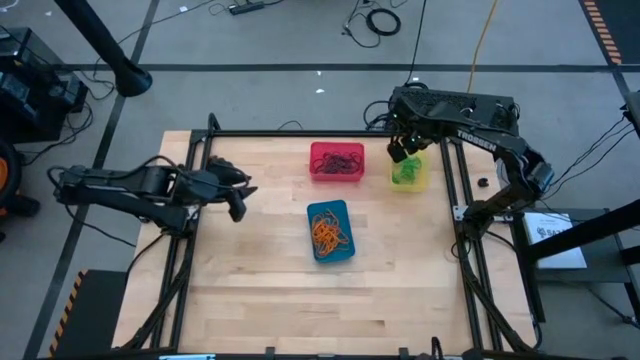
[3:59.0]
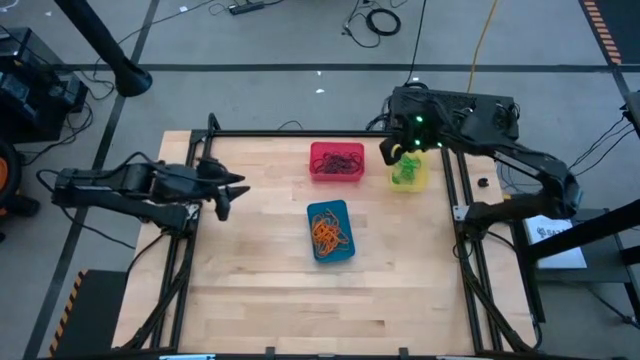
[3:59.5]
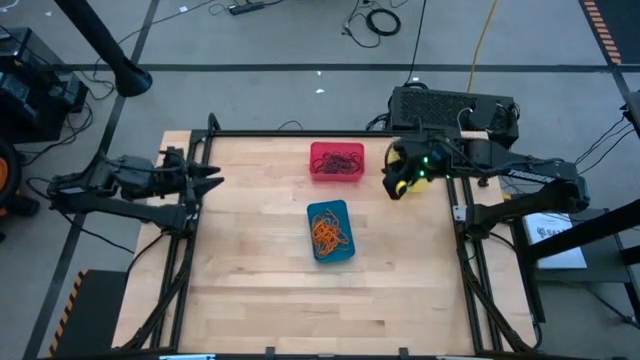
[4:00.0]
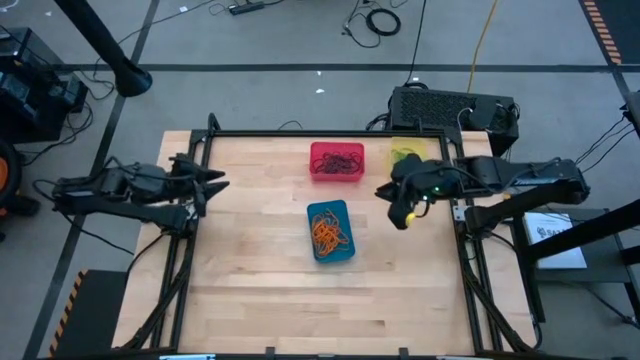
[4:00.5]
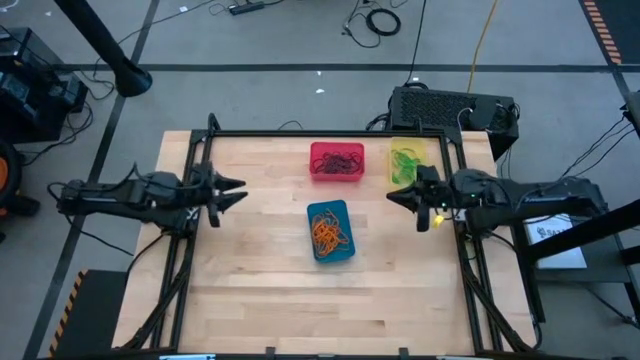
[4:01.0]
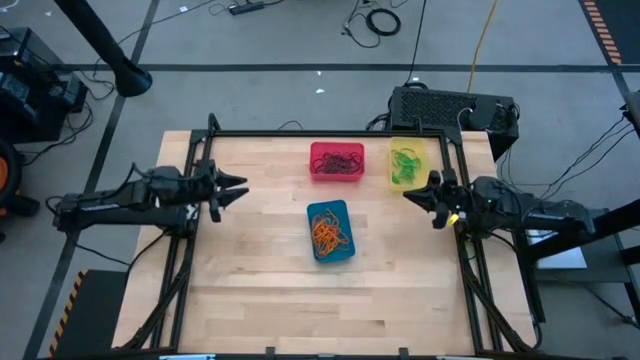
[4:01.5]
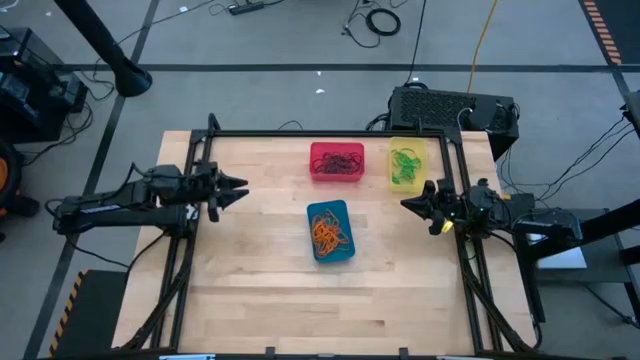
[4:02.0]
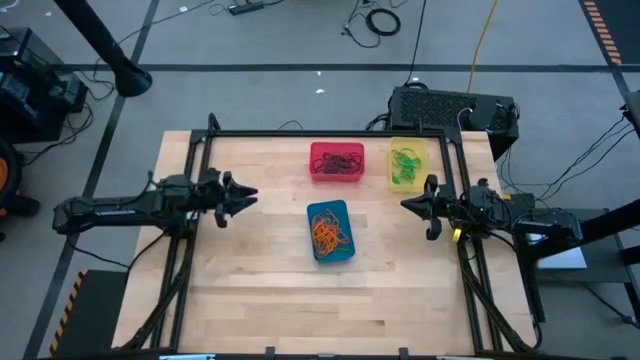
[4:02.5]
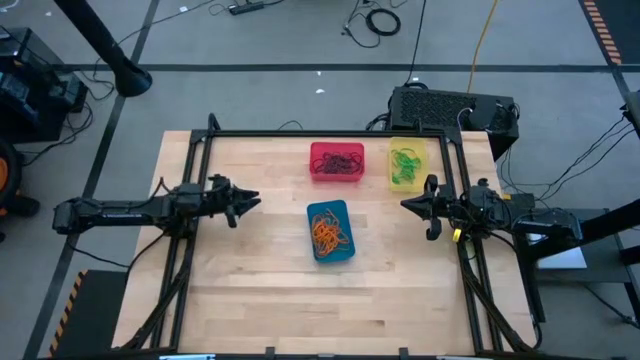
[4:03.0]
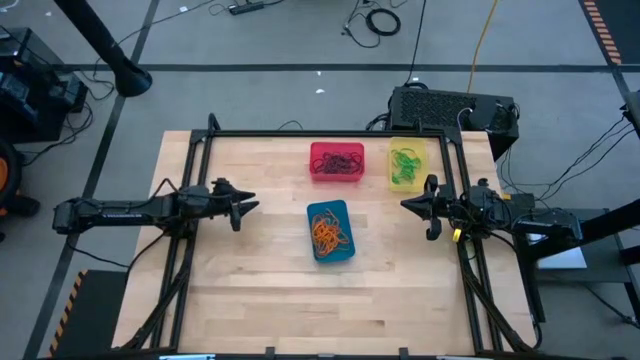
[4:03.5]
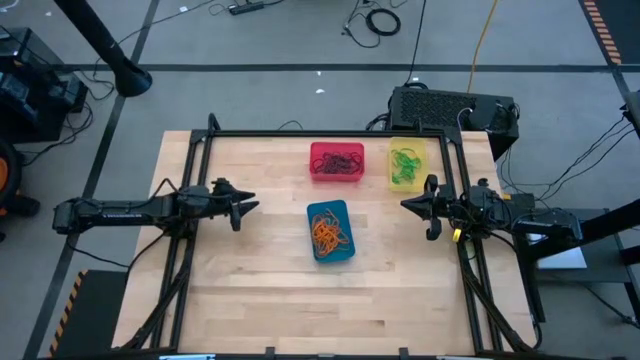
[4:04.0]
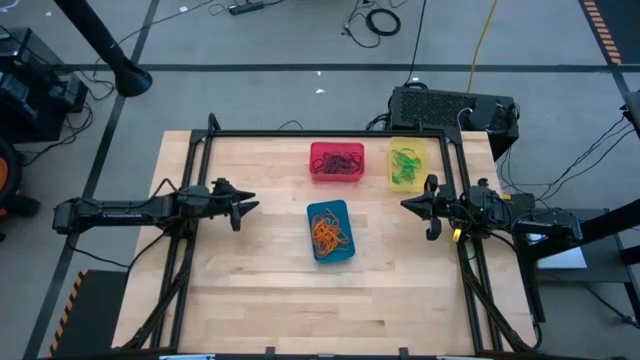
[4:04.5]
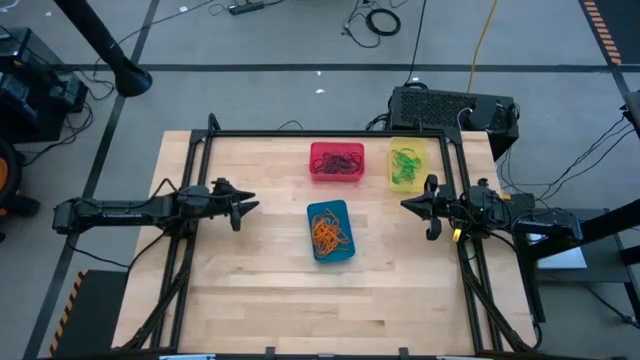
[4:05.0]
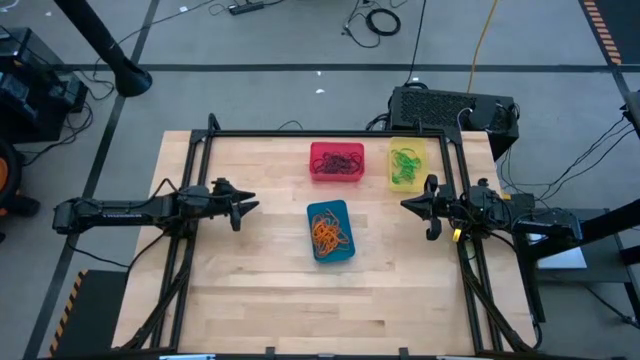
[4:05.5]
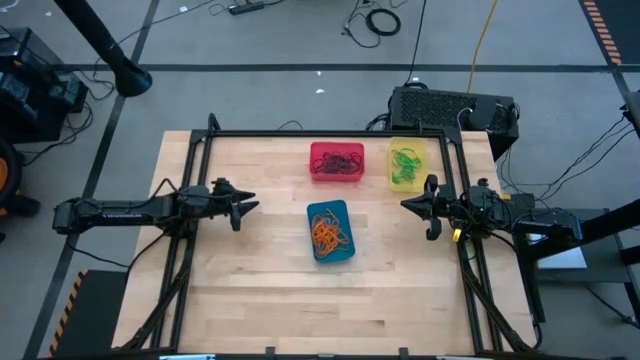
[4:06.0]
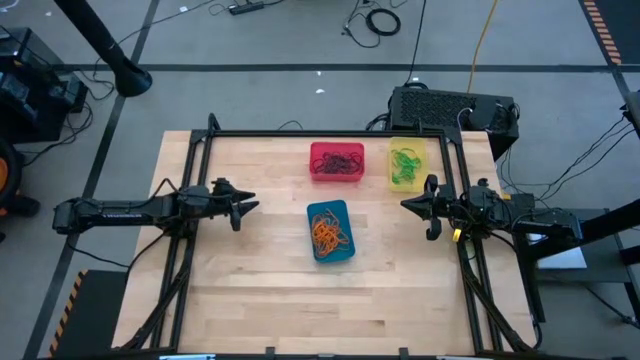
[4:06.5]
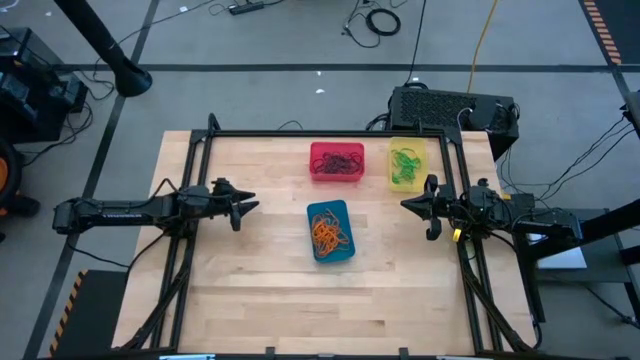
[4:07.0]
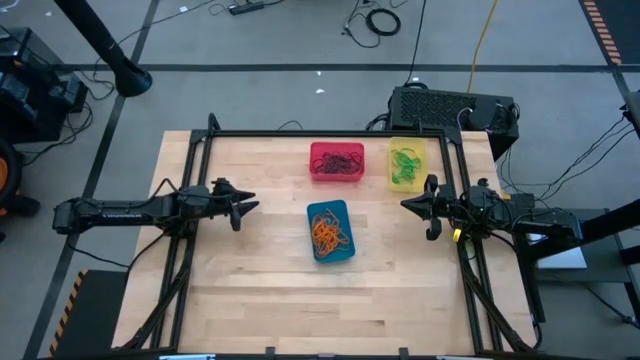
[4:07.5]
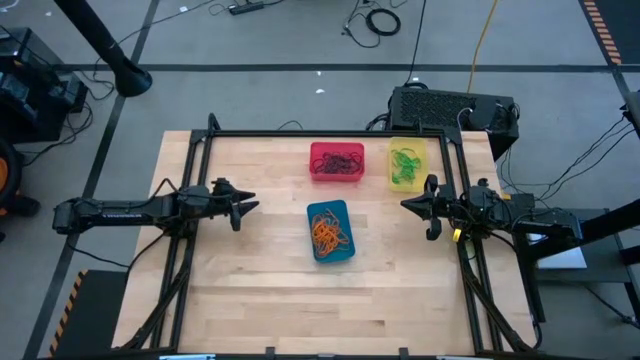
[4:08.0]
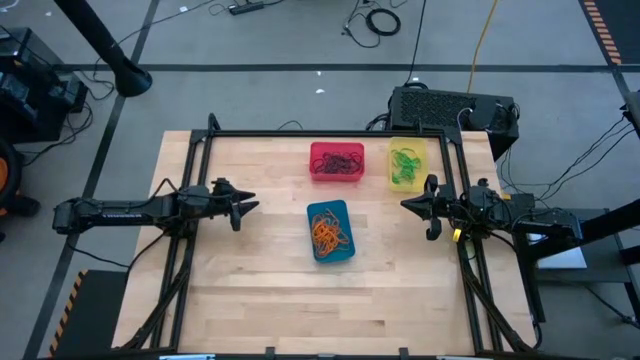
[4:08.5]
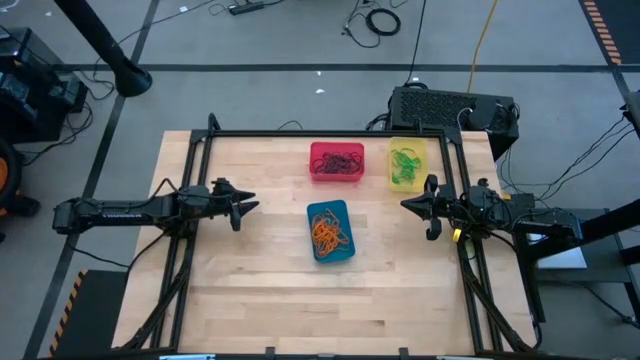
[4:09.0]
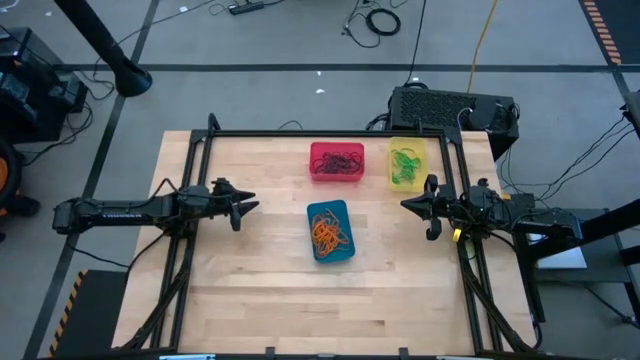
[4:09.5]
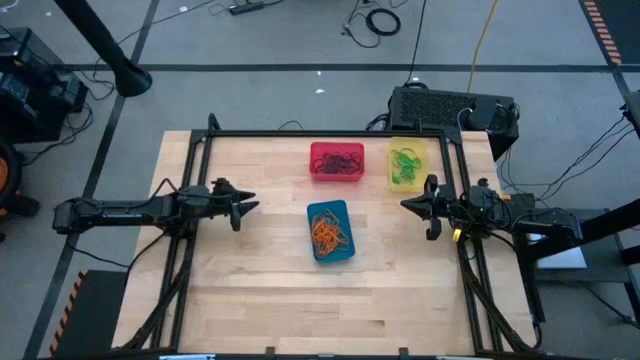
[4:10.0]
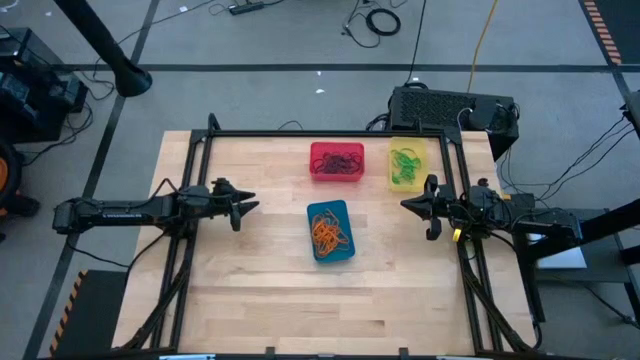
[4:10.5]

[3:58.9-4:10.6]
Task: Sort rubber bands into baskets
Return to Home Position

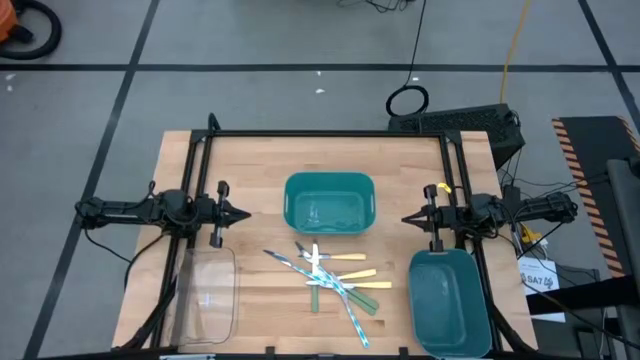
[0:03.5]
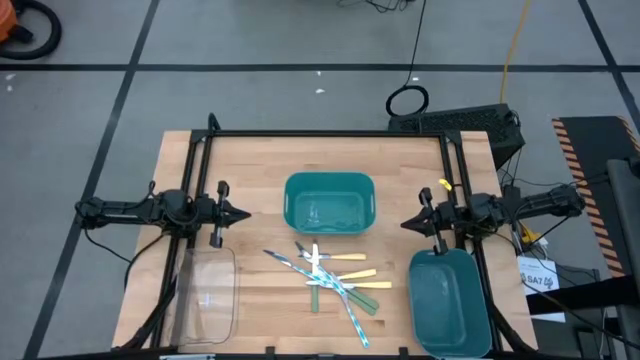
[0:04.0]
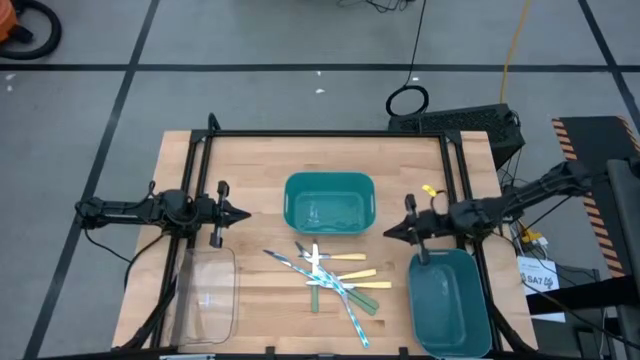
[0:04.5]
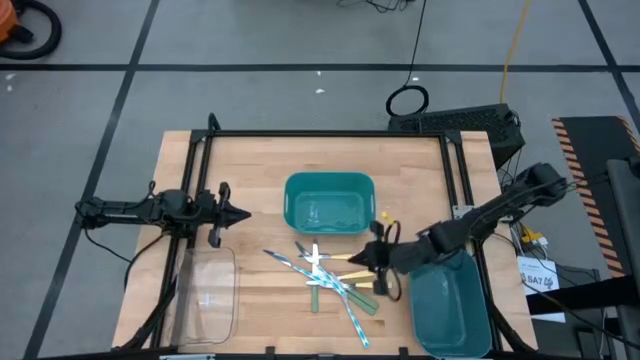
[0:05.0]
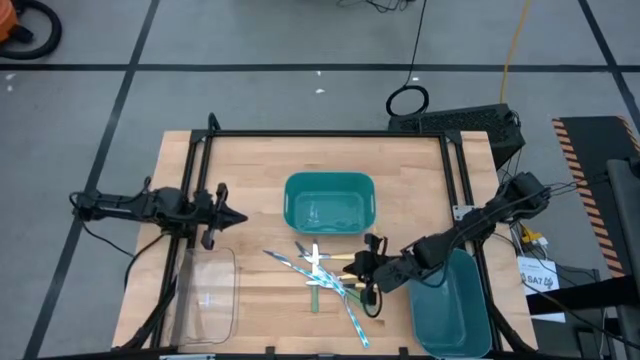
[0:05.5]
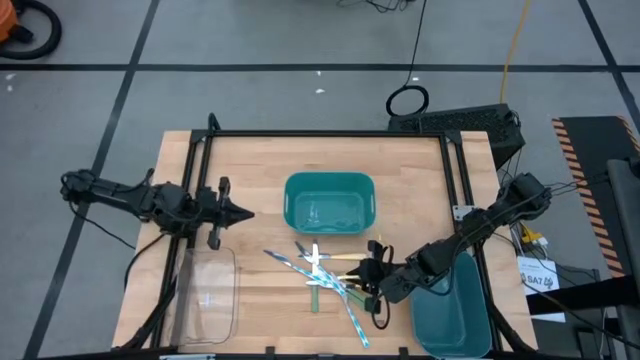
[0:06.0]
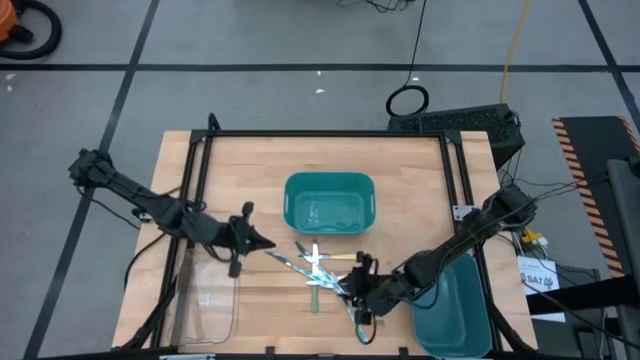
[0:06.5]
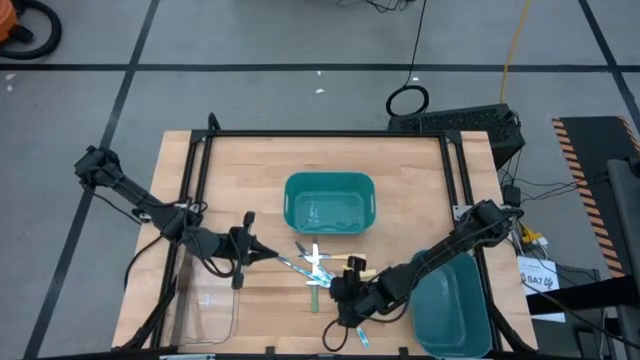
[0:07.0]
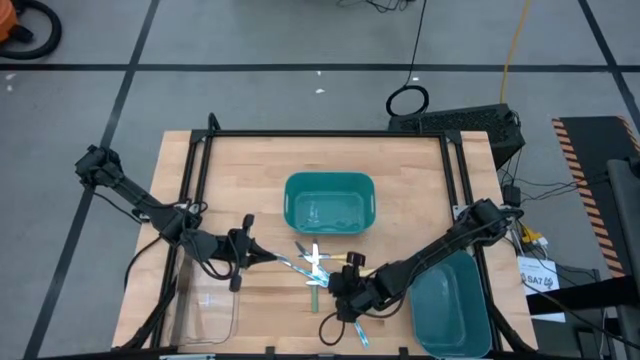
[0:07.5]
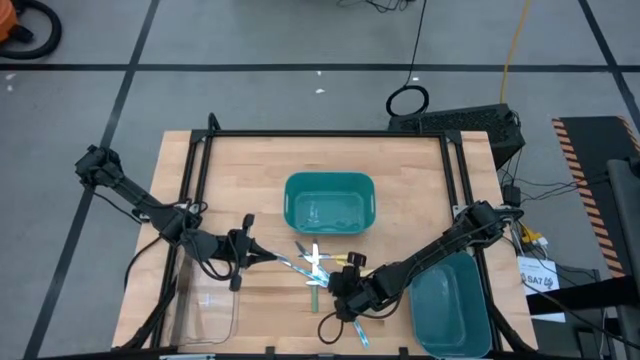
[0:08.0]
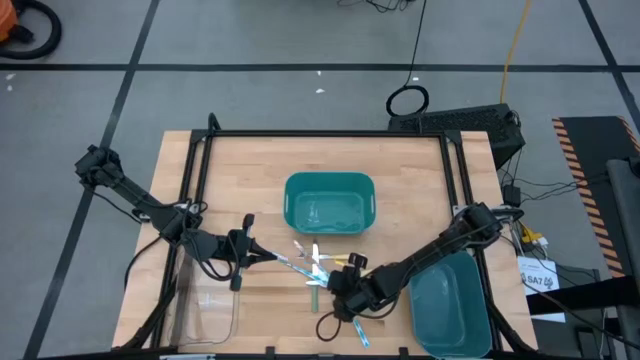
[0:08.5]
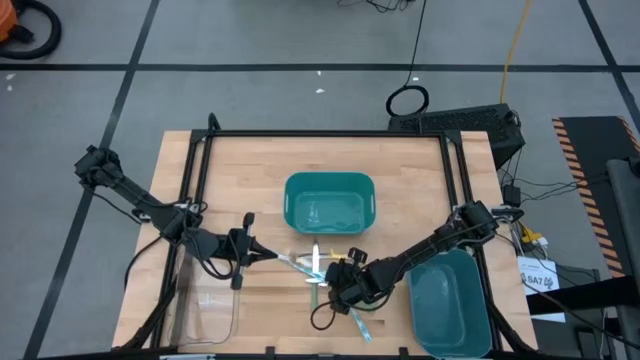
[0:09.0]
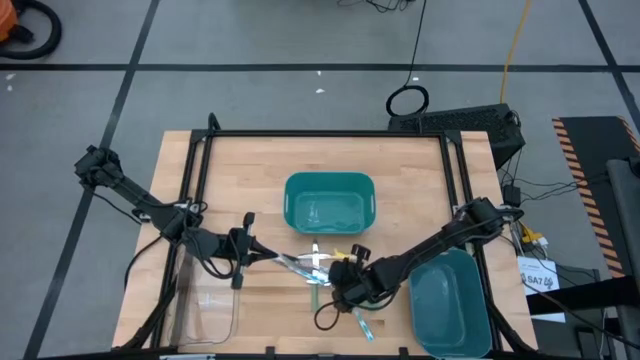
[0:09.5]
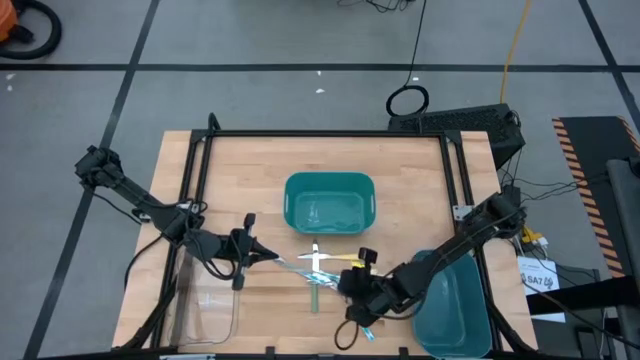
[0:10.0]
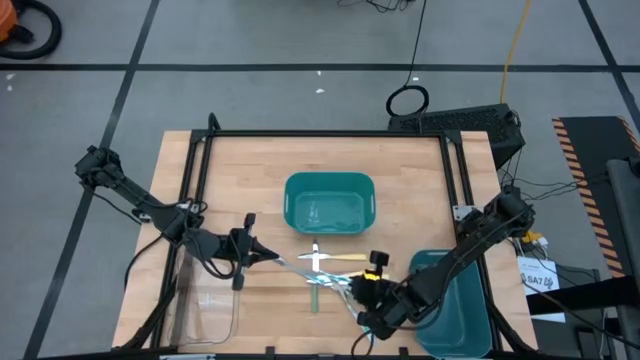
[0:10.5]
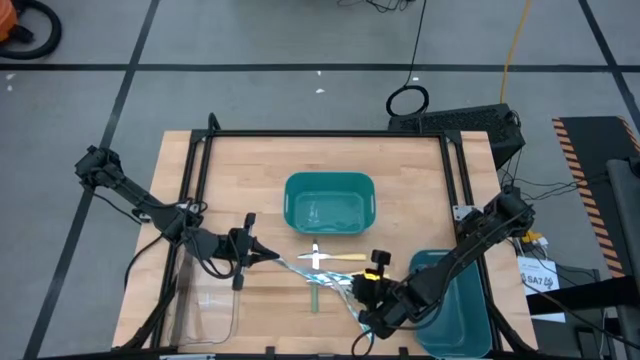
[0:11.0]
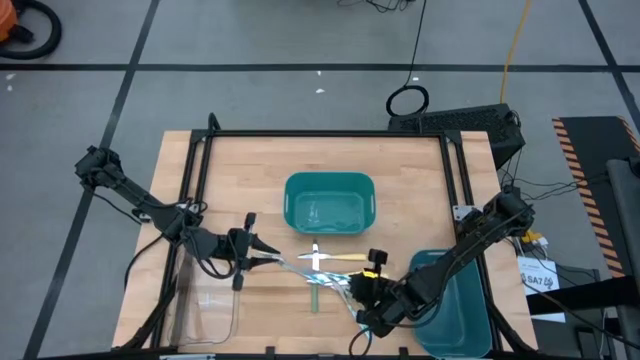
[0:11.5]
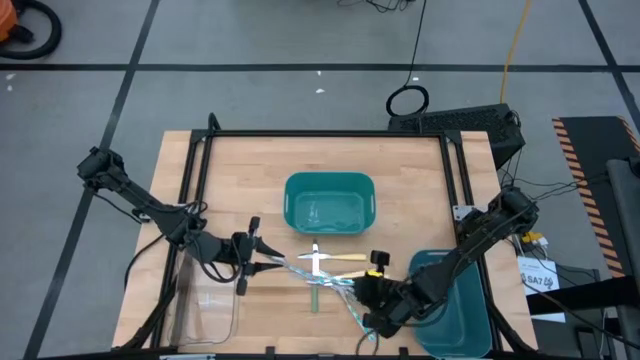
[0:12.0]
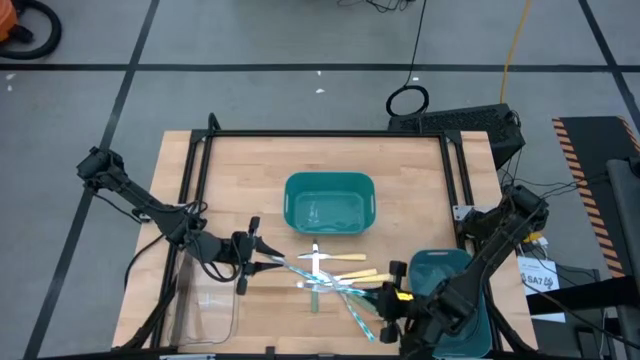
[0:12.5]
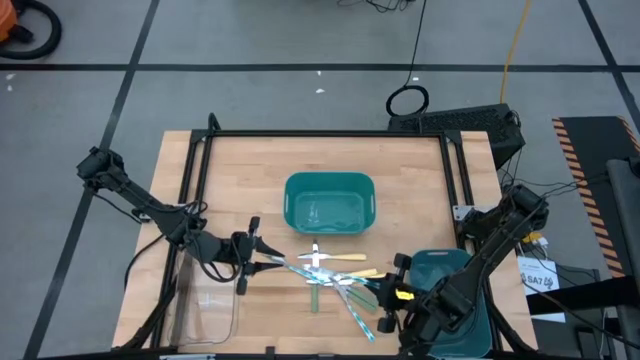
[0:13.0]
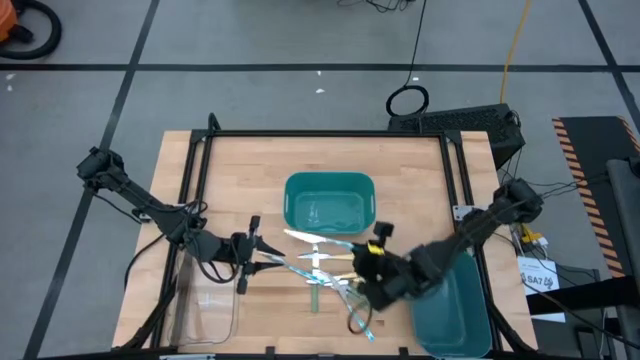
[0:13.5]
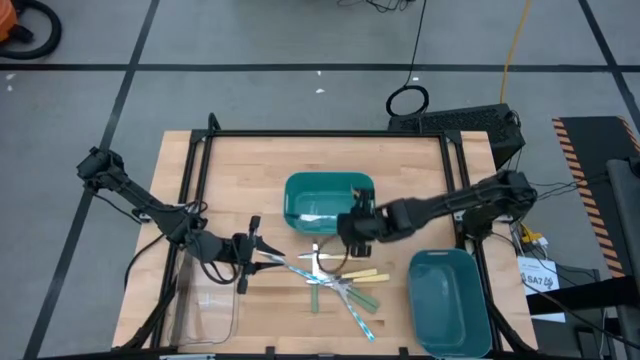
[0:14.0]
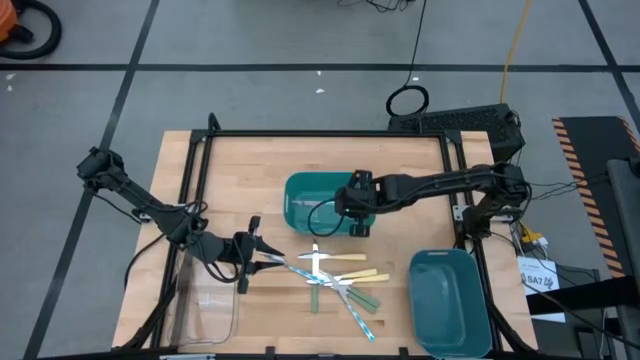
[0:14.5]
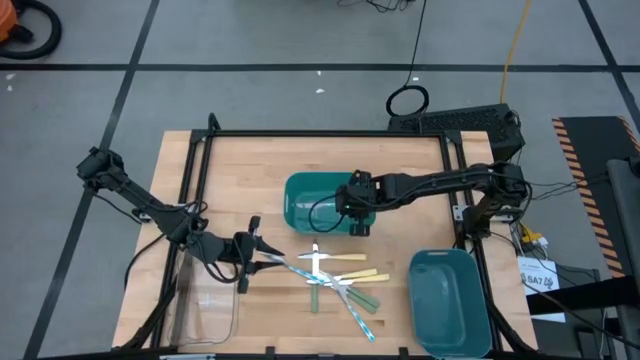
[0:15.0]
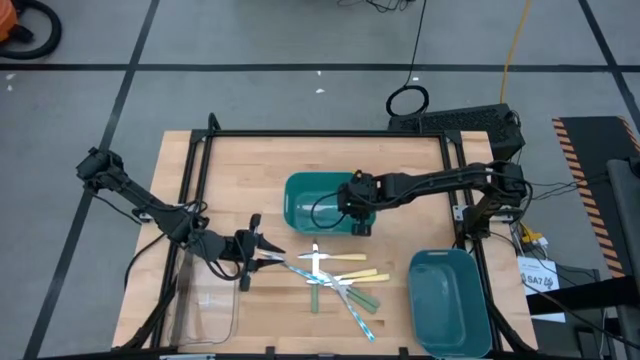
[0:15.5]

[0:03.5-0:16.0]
Task: Sort silverware by color (type)
Put the top right blue knife into the green bin
